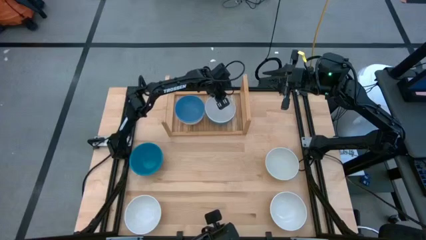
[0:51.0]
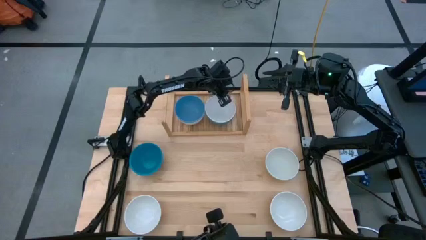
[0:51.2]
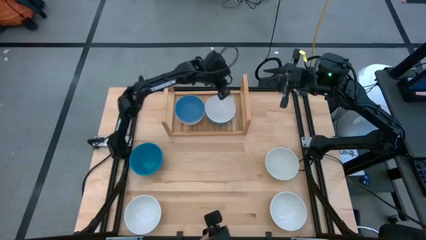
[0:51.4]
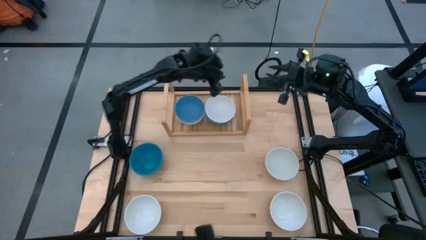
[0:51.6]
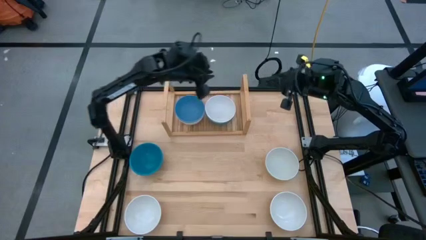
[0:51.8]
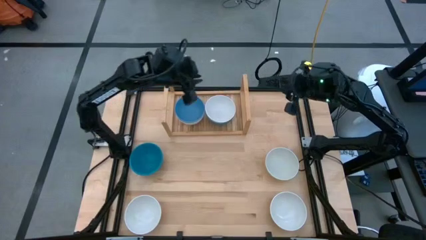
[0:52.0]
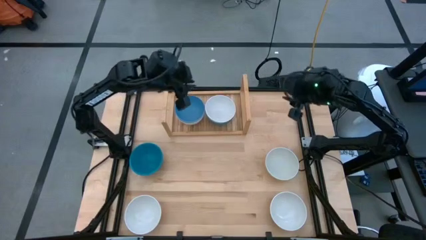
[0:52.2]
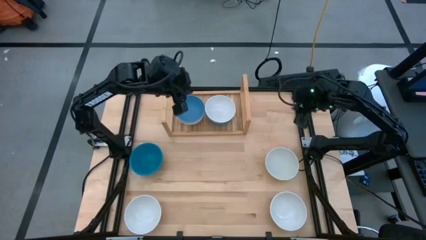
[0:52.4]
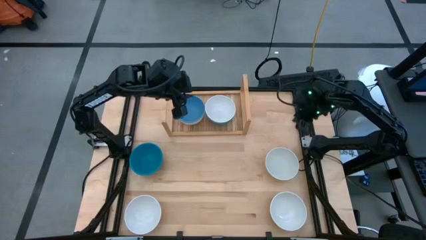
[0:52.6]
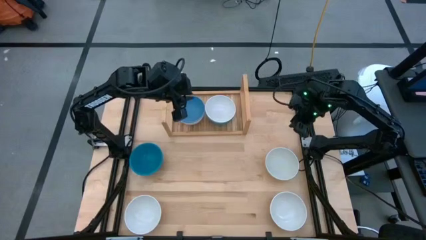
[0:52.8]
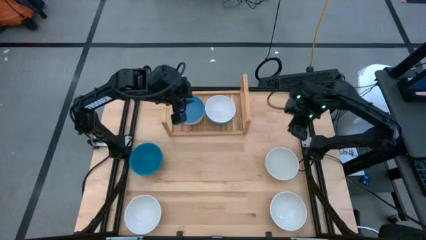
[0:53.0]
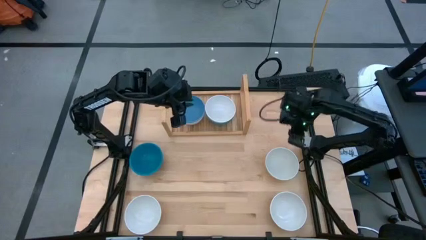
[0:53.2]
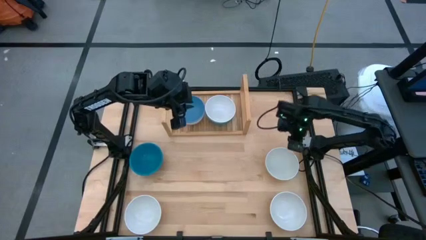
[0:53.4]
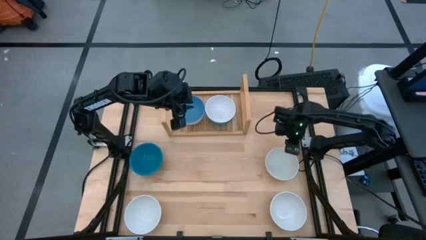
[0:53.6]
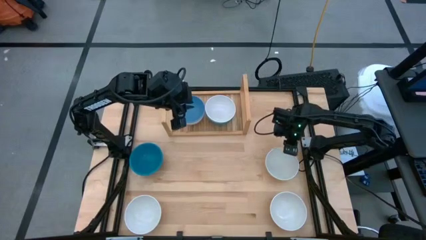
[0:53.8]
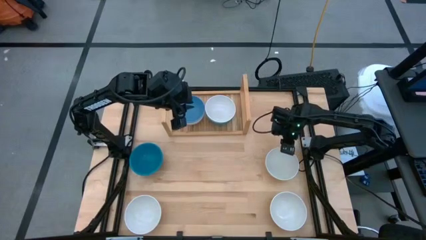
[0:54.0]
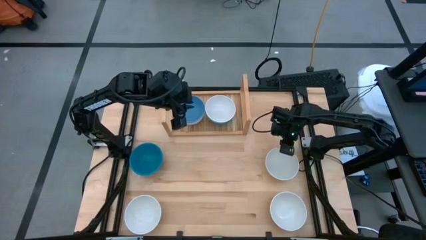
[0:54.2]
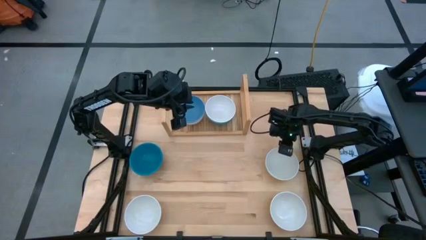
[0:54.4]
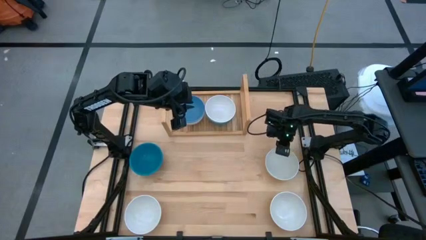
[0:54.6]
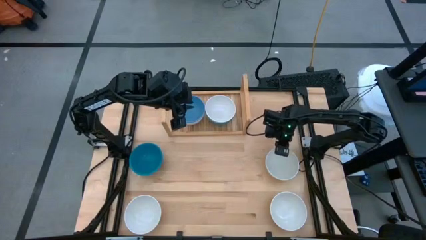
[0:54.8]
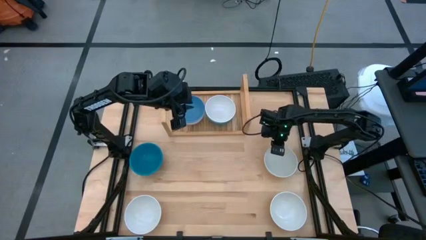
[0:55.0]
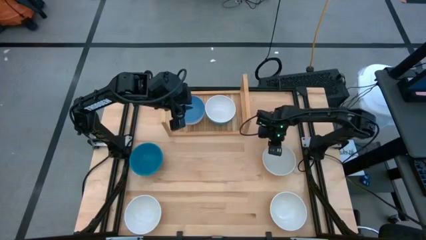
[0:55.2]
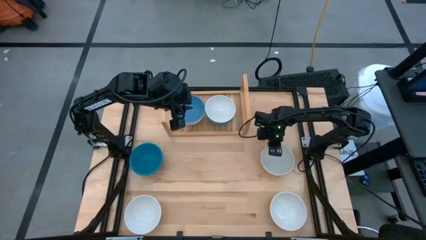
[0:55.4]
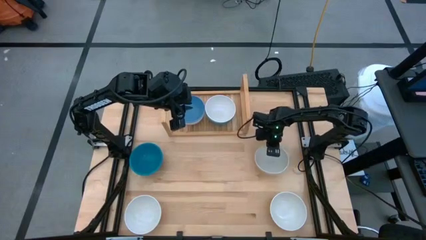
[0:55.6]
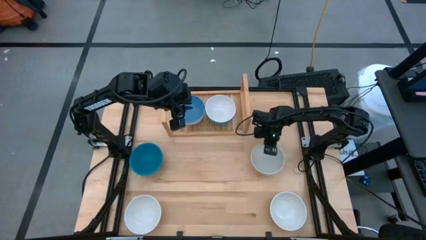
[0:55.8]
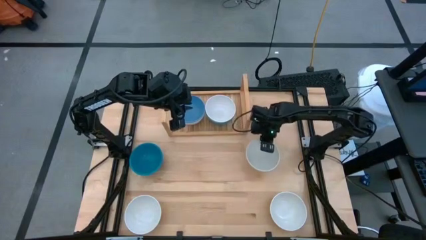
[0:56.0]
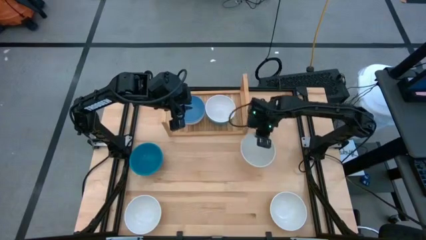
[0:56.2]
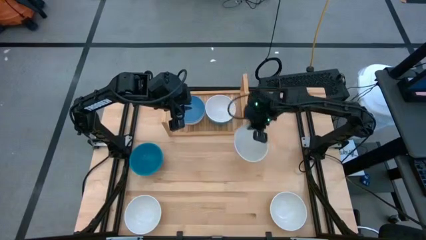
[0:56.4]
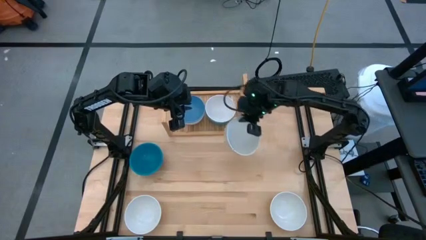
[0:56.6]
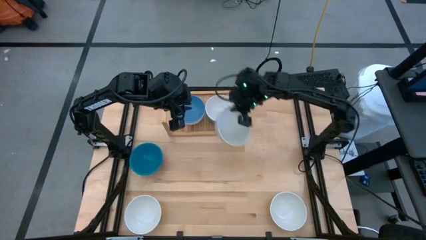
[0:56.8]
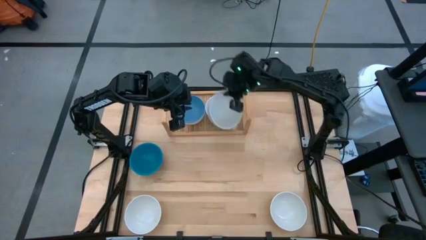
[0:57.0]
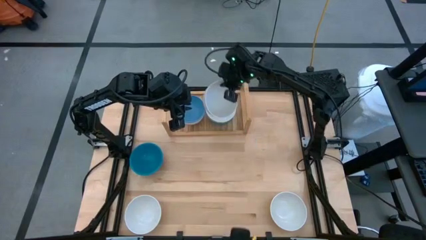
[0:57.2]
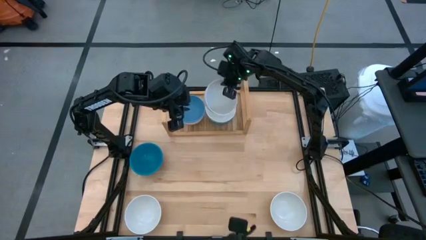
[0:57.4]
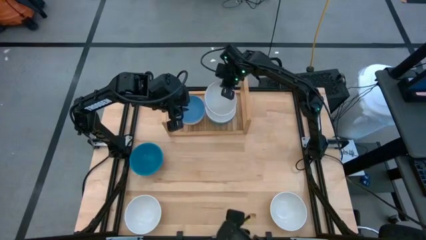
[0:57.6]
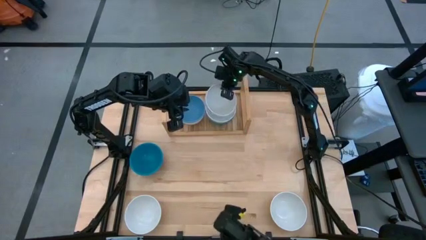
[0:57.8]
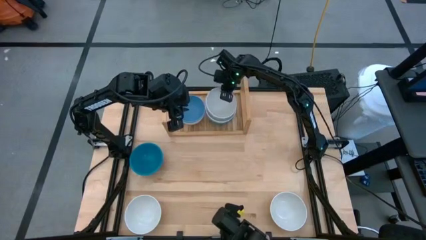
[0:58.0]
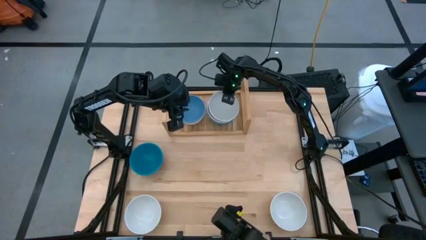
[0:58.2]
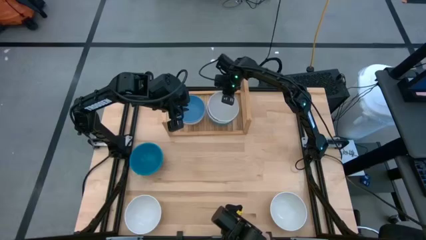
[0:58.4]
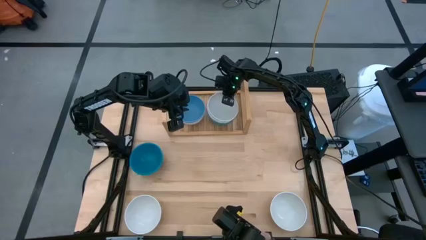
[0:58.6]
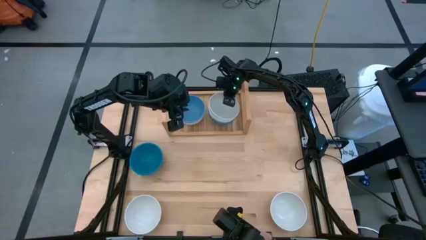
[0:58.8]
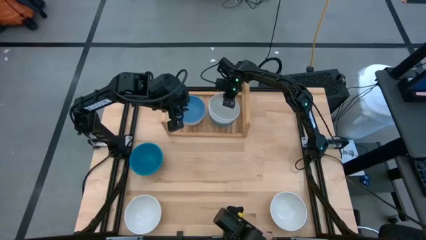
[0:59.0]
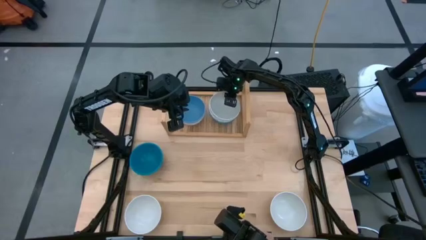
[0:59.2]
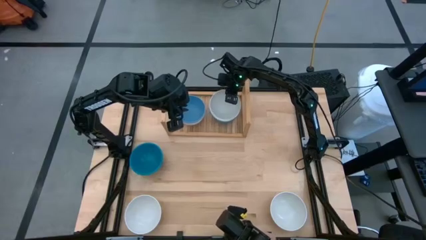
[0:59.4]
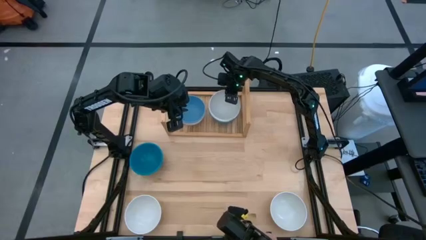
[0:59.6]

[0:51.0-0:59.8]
Task: Place and stack bowls onto a shelf
Stack the white bowl on the right white bowl on the shelf

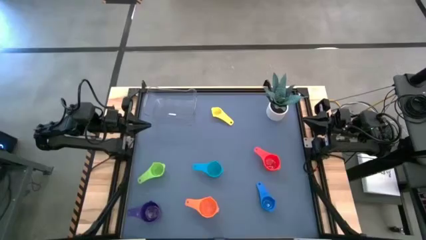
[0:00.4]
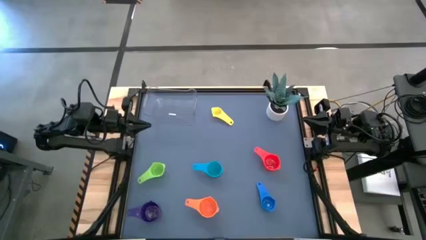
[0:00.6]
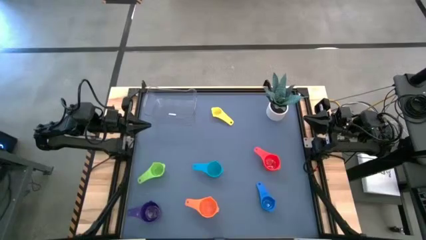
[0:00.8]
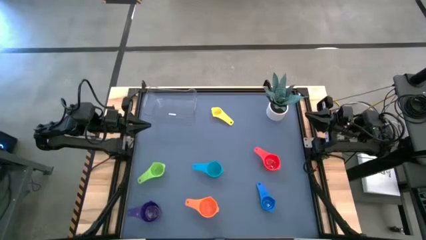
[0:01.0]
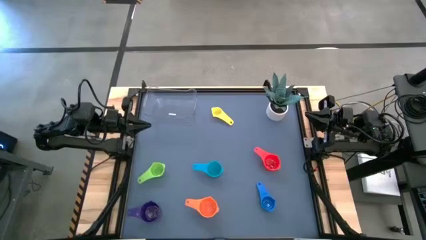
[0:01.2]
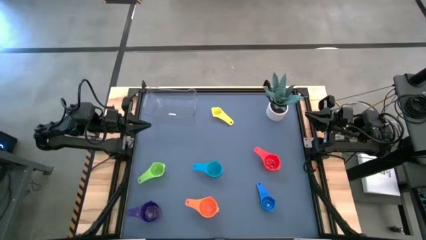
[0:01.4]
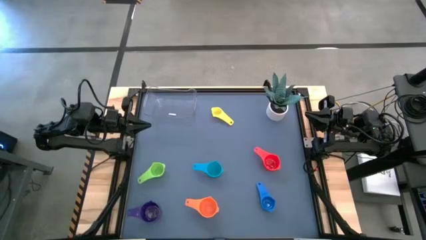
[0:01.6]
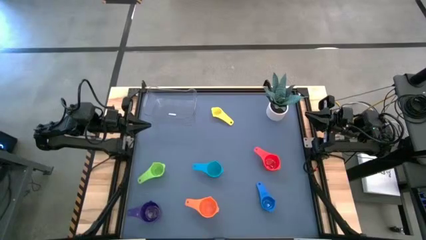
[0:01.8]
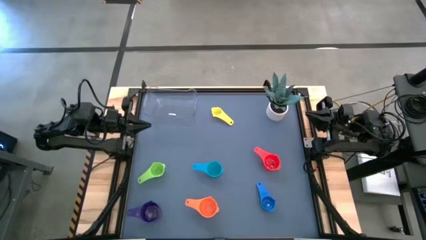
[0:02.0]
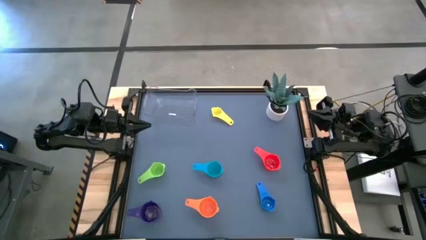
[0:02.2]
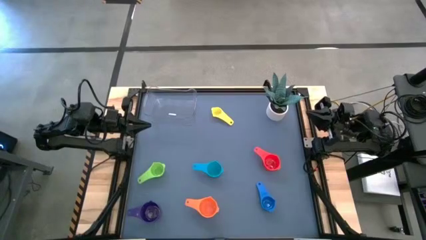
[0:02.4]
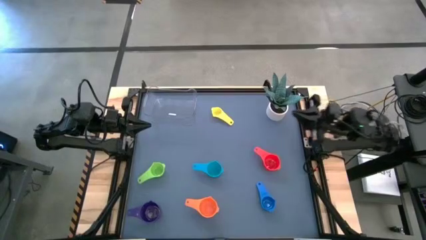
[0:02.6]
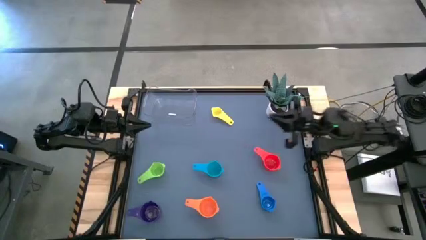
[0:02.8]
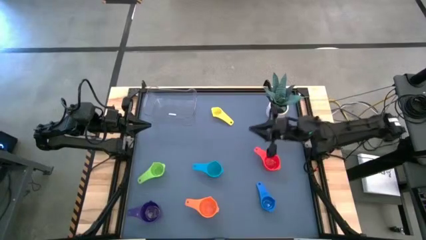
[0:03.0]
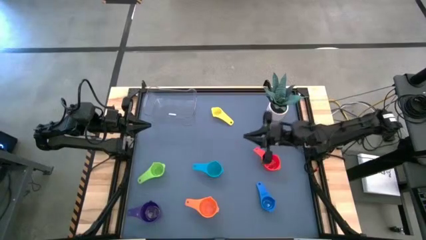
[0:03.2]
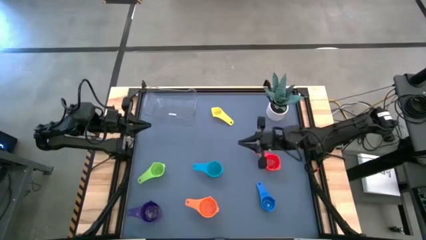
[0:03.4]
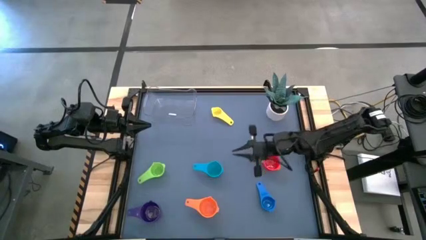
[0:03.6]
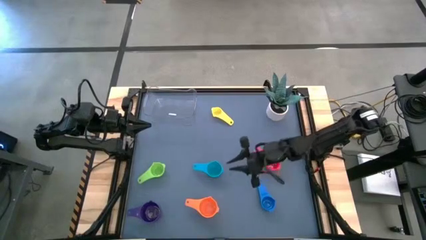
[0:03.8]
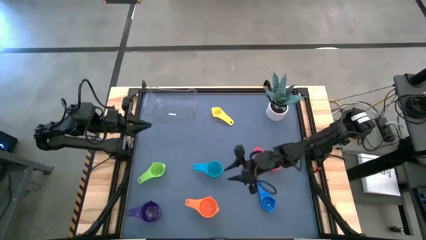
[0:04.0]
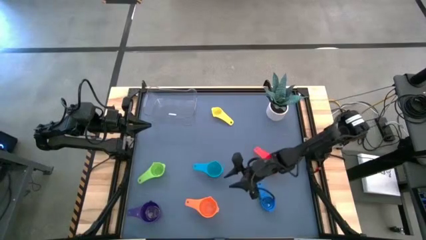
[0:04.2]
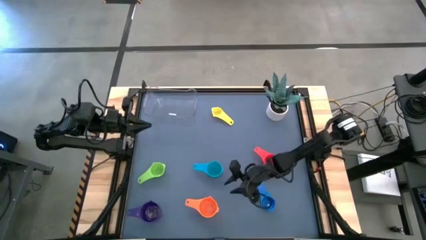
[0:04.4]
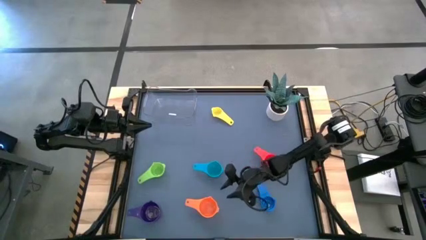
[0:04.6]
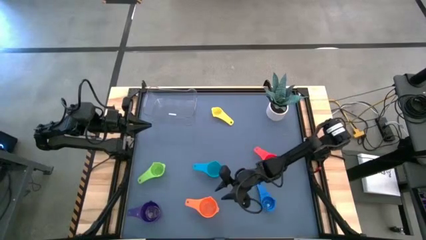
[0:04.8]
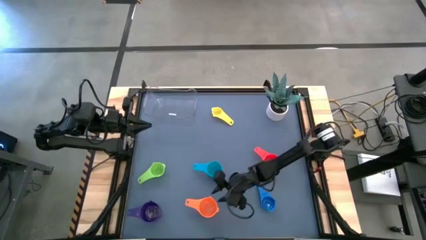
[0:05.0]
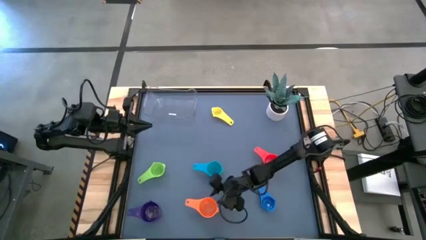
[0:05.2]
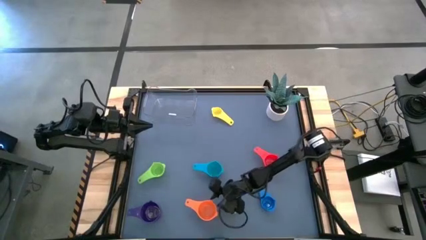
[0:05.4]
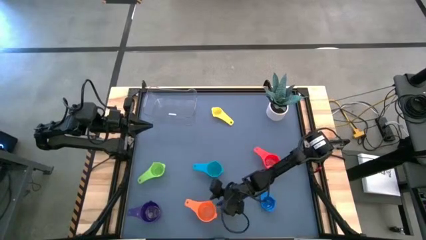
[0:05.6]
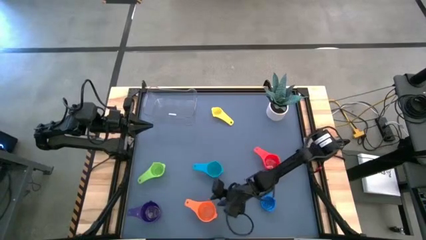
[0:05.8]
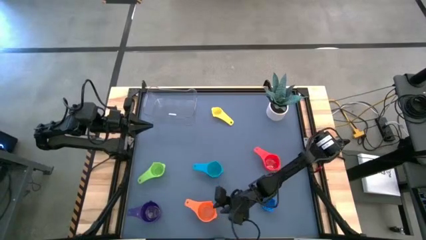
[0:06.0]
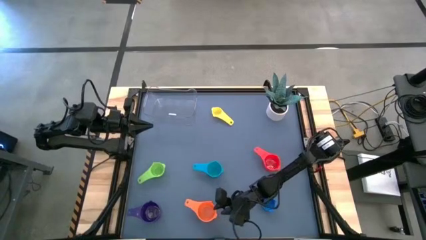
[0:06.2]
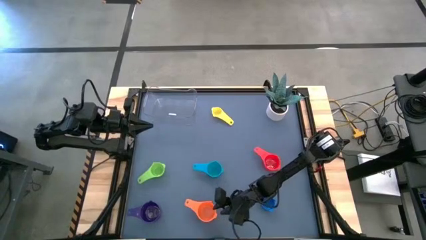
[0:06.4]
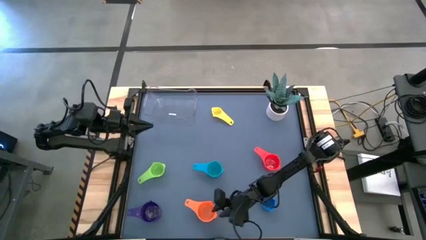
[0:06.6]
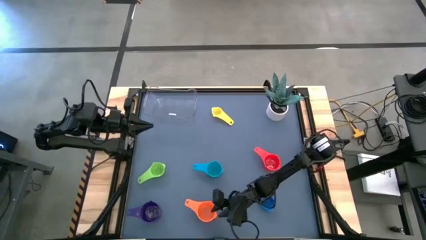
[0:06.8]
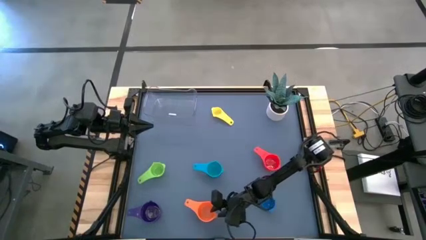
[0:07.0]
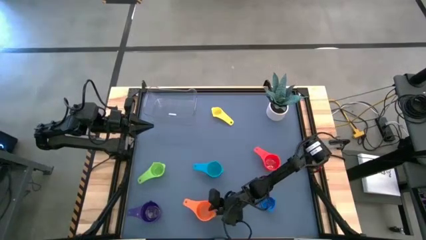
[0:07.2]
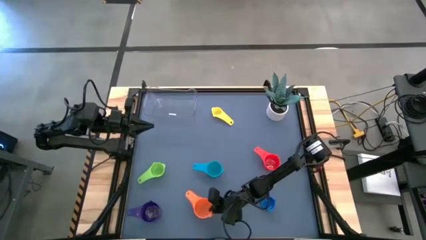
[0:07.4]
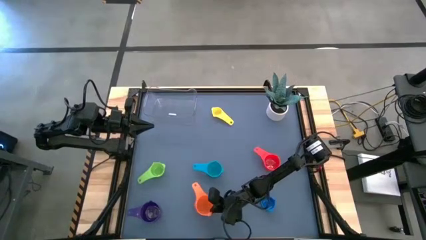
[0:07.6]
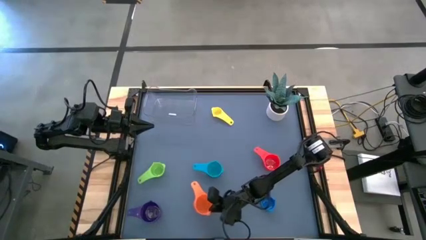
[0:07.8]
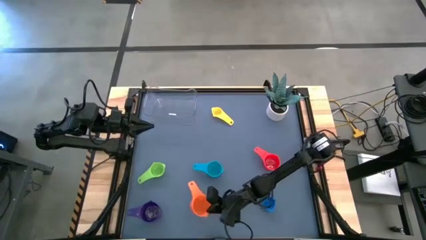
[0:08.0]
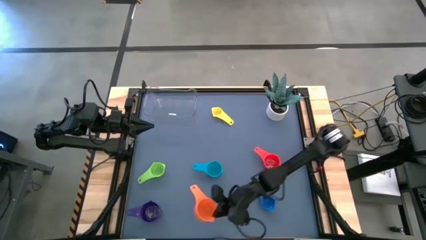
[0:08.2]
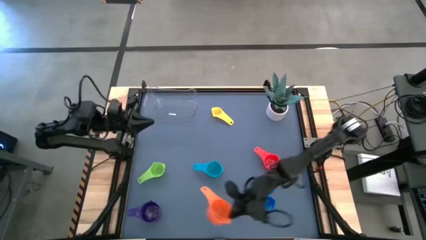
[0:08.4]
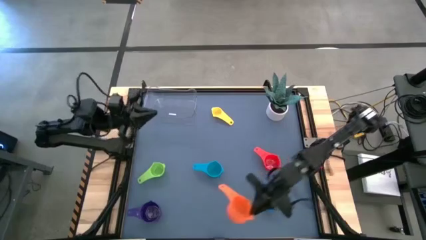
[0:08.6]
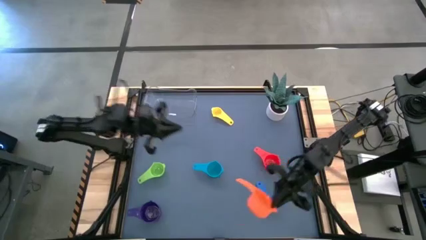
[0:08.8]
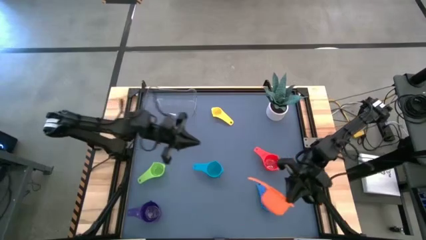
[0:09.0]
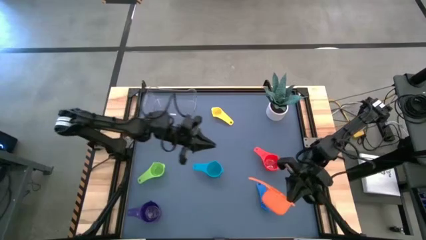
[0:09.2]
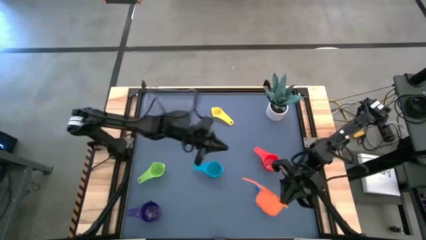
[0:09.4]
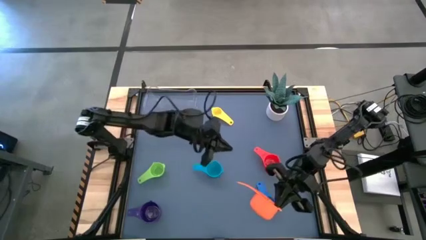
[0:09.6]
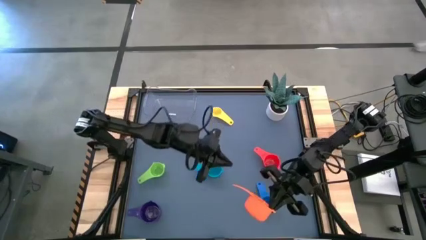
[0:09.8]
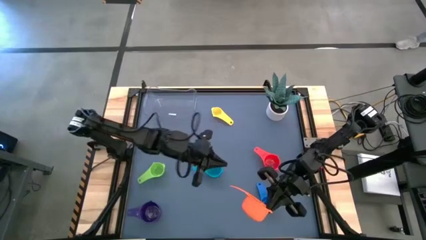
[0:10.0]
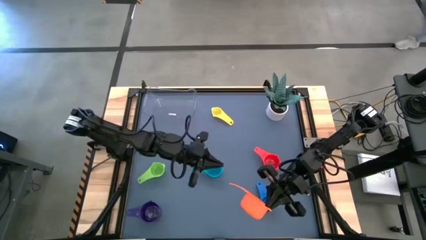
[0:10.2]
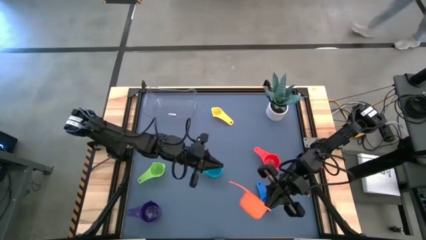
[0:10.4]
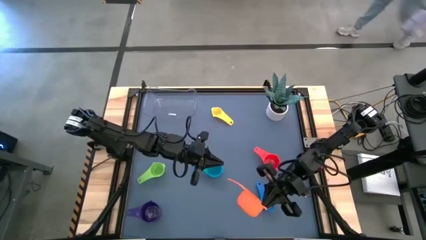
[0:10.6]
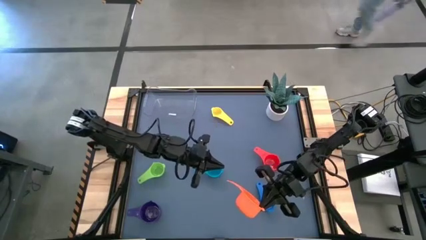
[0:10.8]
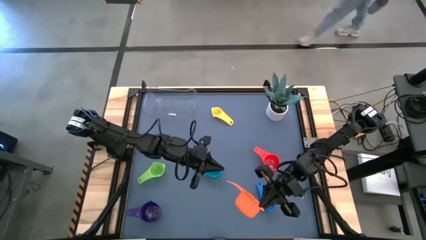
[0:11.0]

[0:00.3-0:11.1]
Task: Nest measuring cups in basket
Stack the orange measuring cup on top of the violet measuring cup
